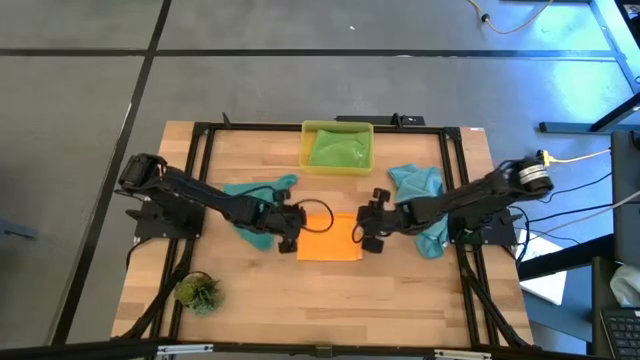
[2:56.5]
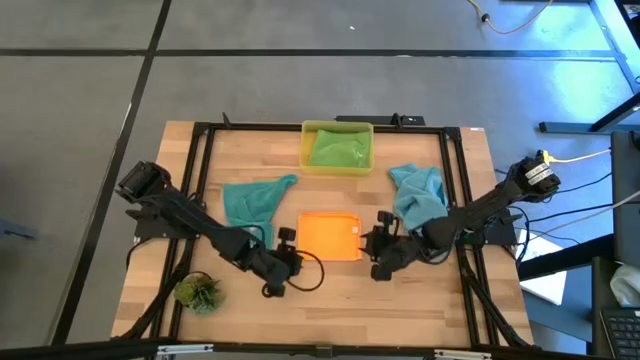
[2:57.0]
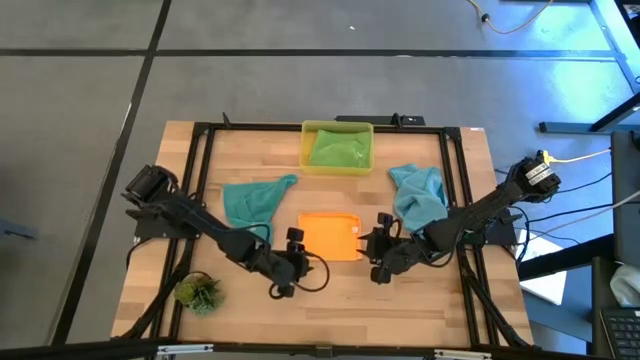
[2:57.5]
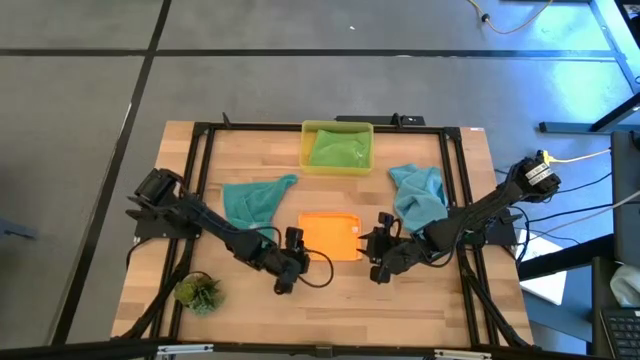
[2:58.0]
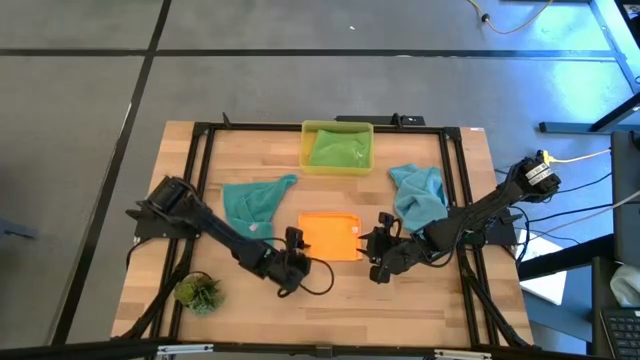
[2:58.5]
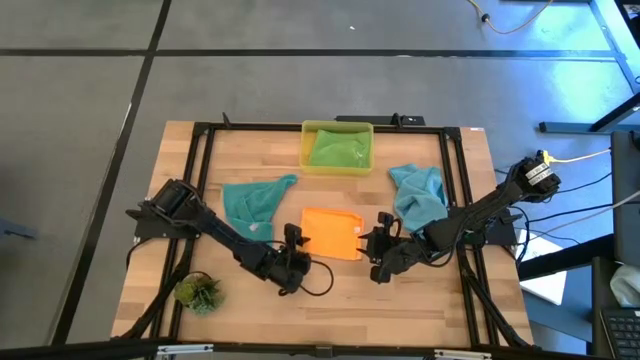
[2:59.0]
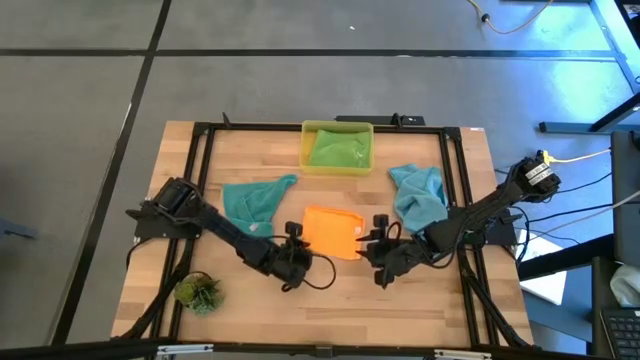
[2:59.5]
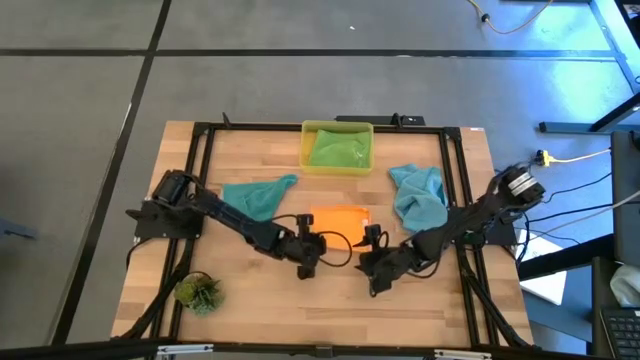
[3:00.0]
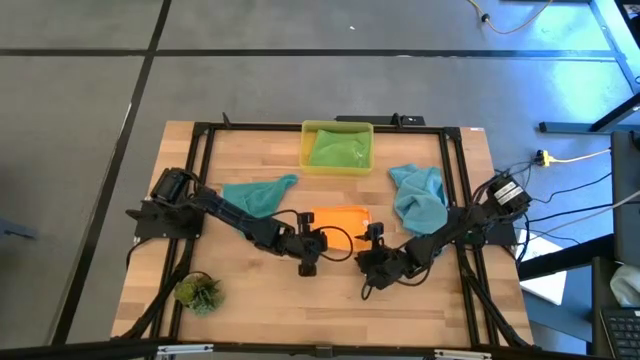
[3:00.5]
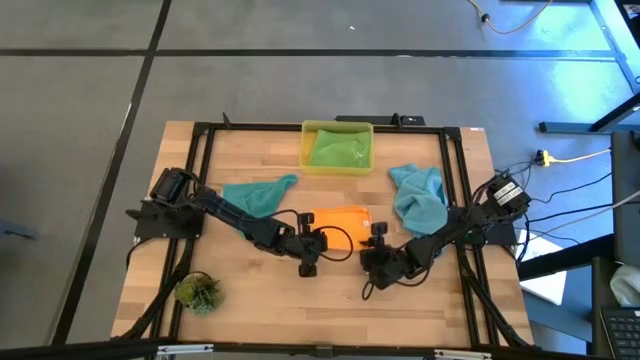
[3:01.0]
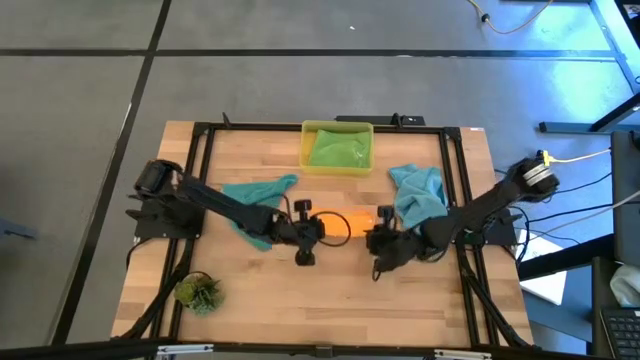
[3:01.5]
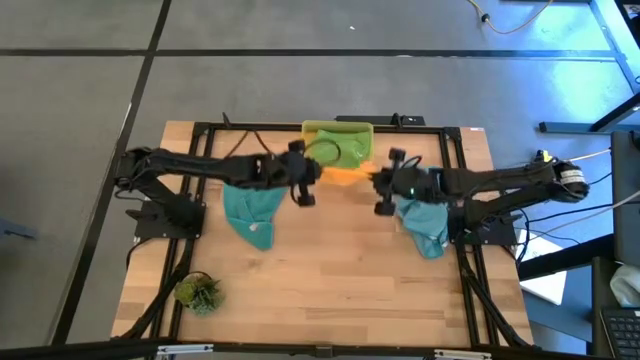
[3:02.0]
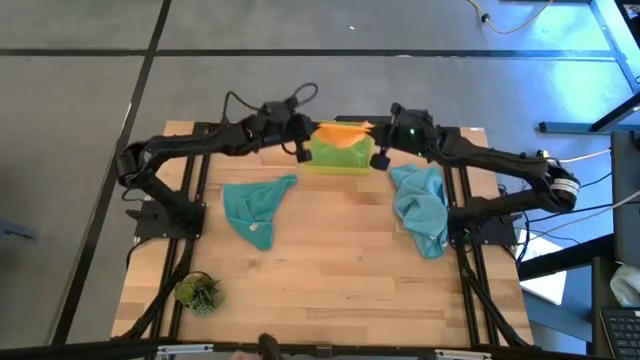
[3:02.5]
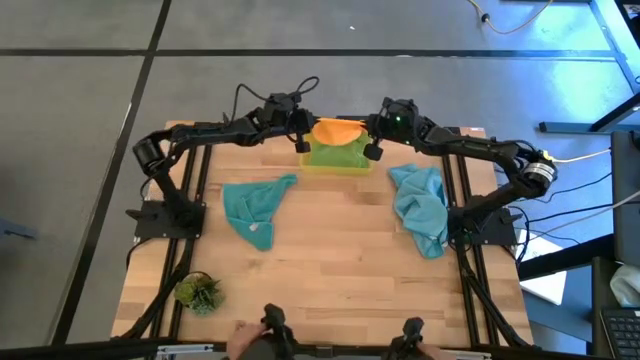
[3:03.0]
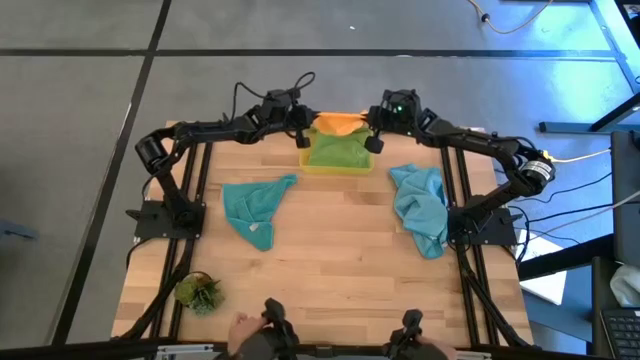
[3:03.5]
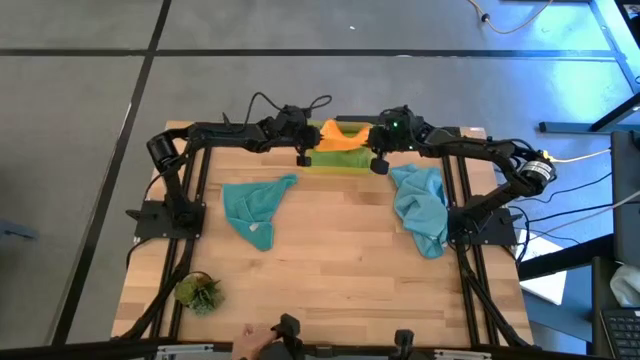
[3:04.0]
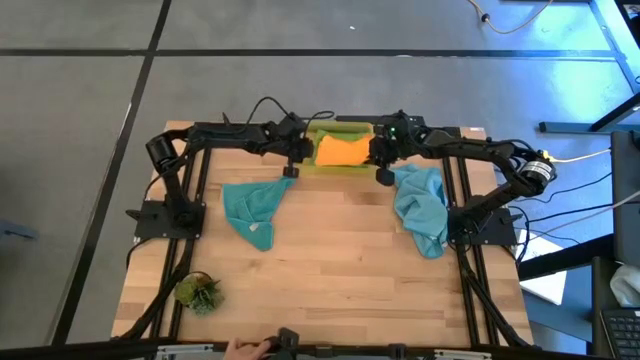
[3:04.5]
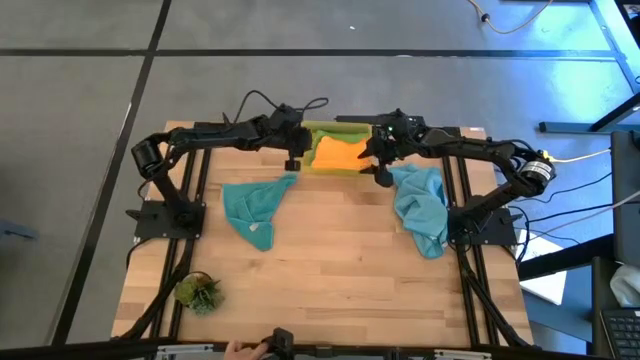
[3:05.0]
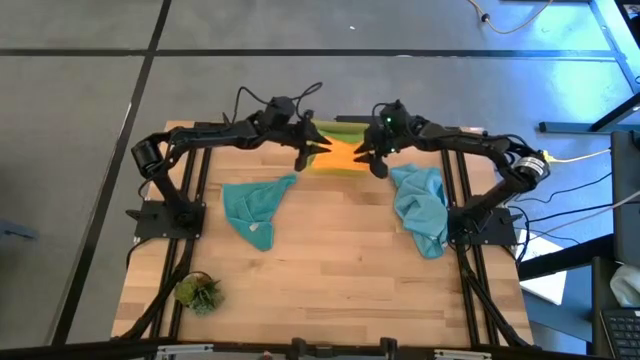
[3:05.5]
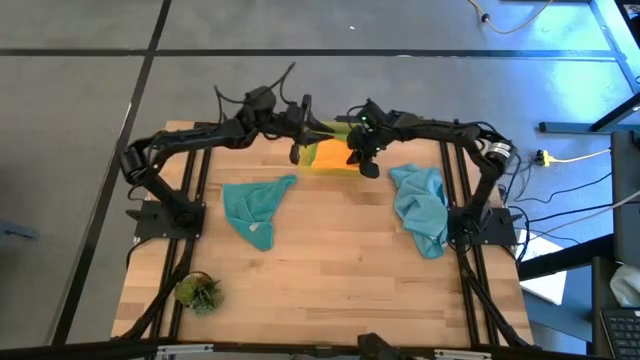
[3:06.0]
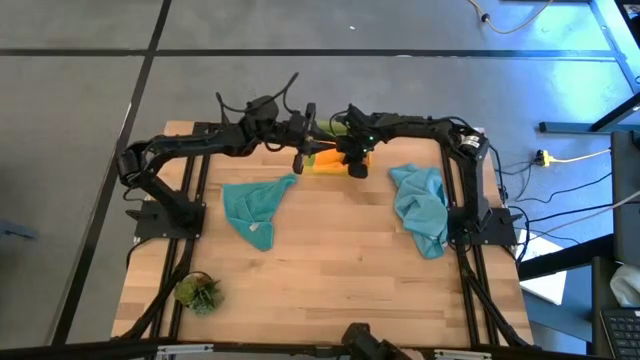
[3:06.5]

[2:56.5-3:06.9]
Task: Fold microfiber towels
Put the orange microfiber cloth into the yellow bin

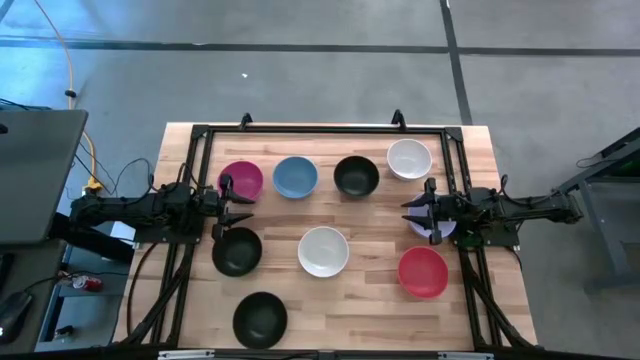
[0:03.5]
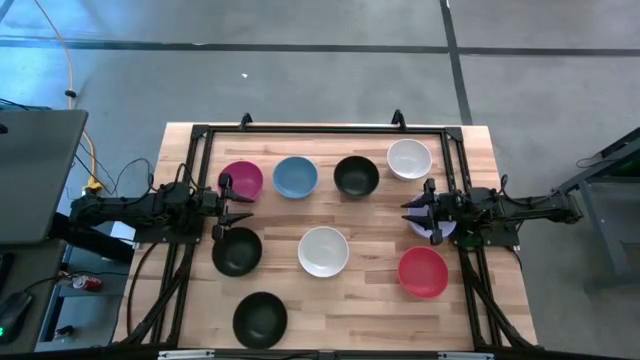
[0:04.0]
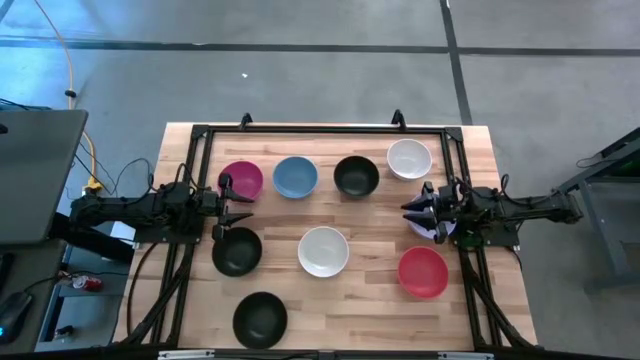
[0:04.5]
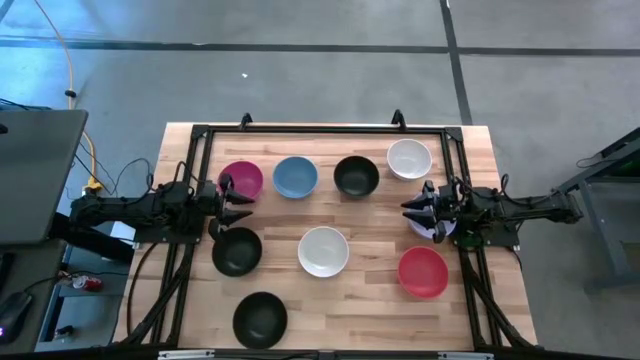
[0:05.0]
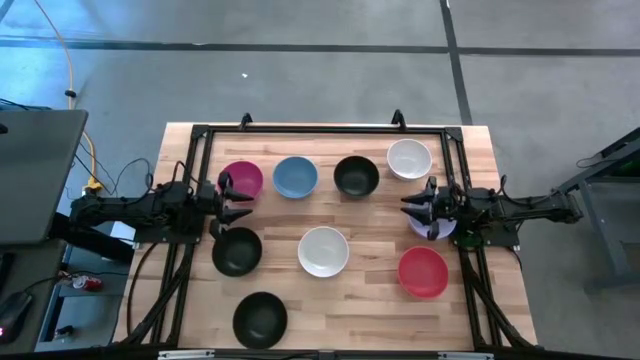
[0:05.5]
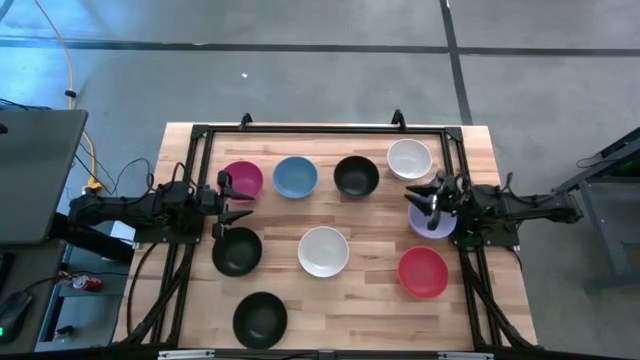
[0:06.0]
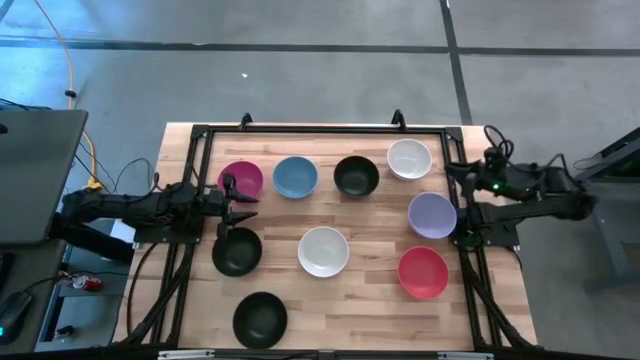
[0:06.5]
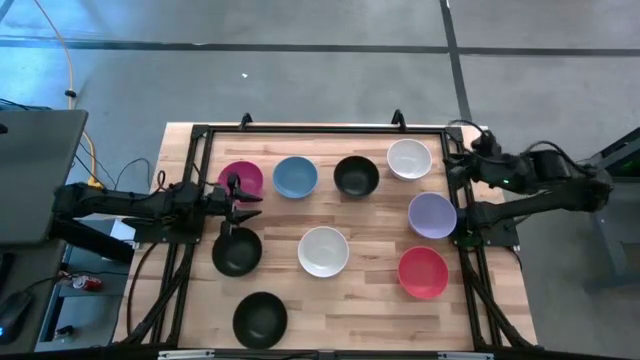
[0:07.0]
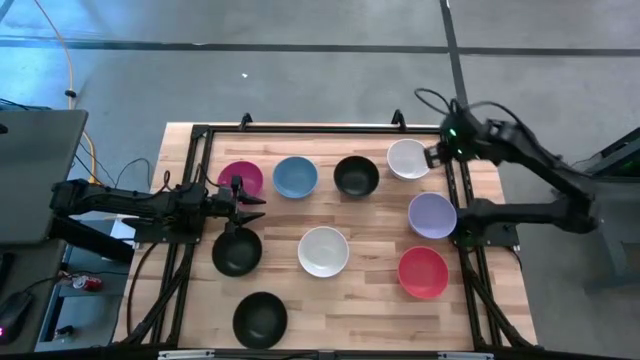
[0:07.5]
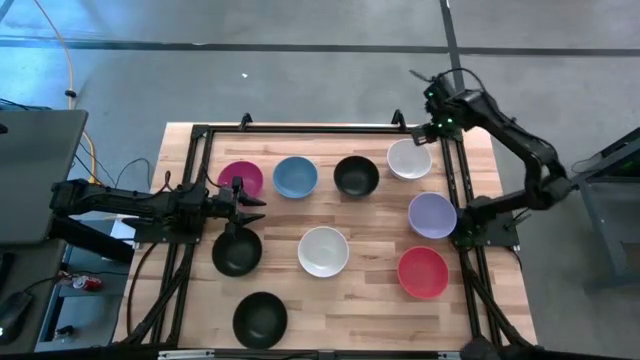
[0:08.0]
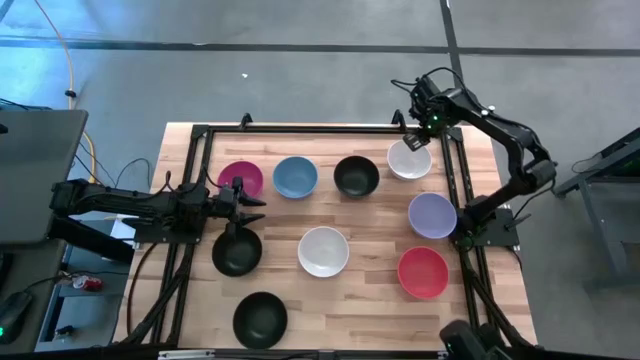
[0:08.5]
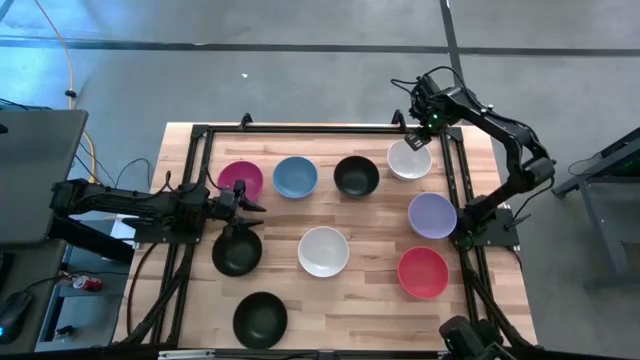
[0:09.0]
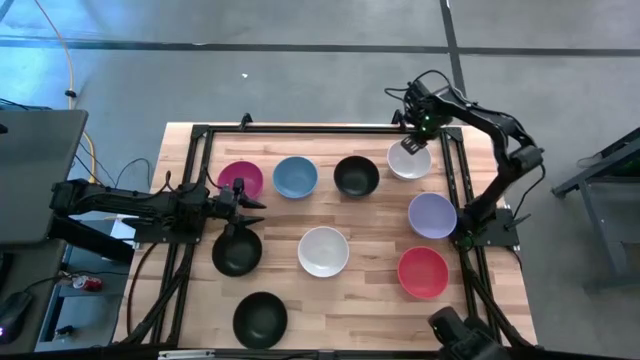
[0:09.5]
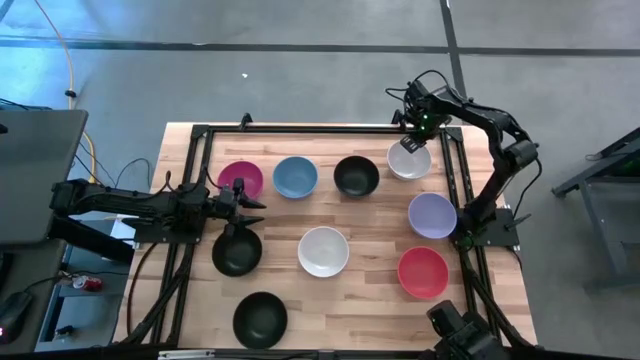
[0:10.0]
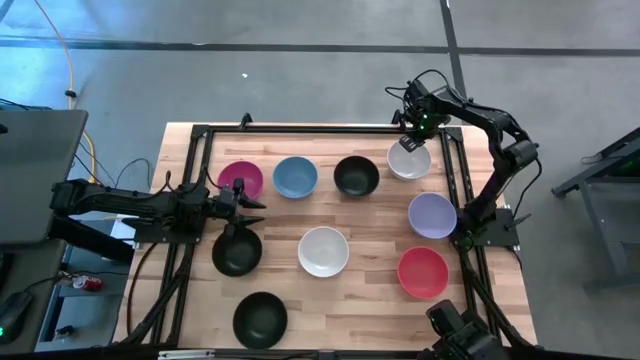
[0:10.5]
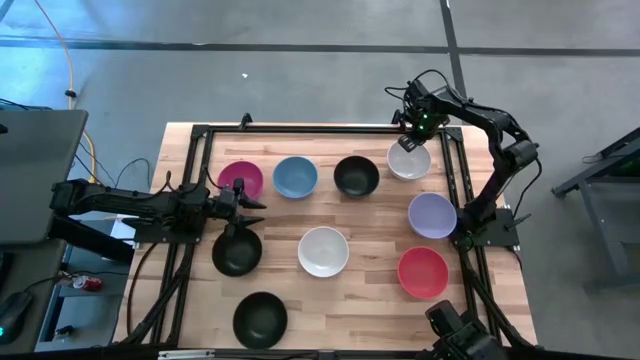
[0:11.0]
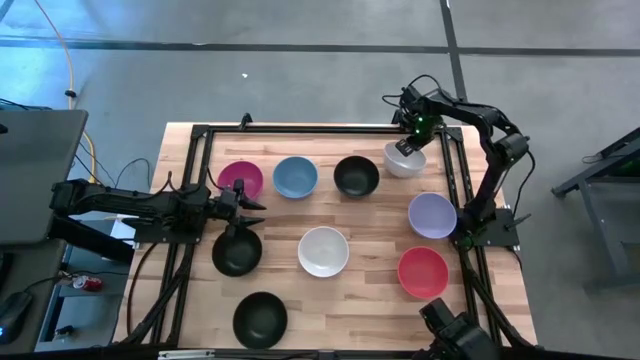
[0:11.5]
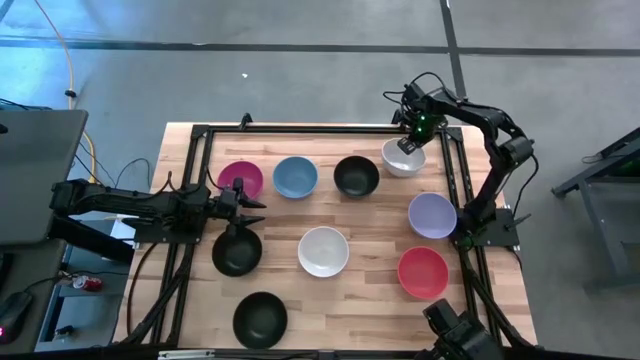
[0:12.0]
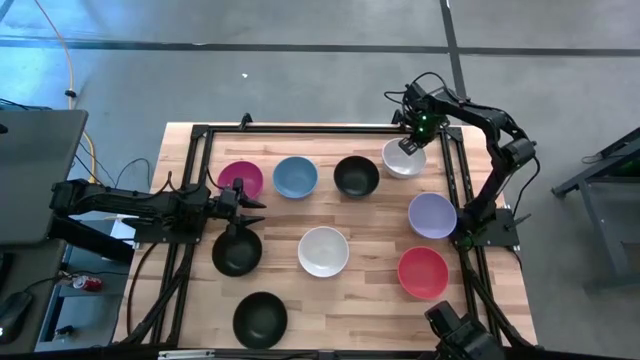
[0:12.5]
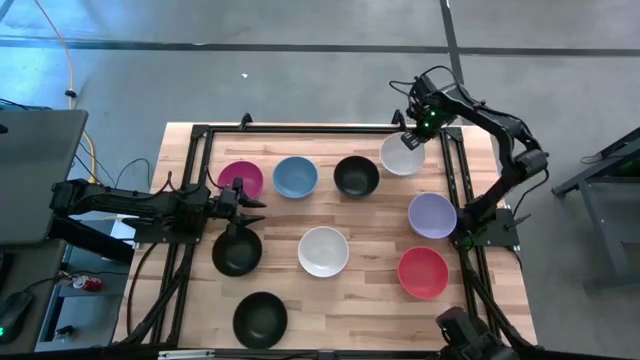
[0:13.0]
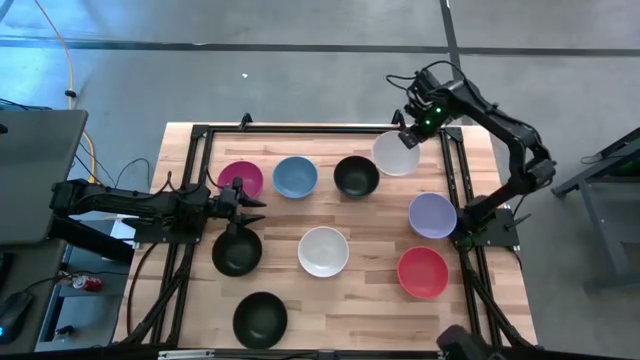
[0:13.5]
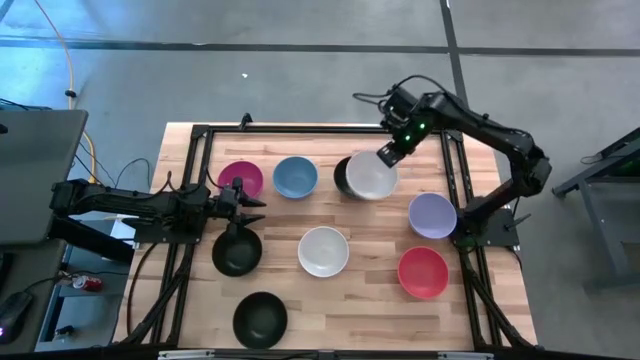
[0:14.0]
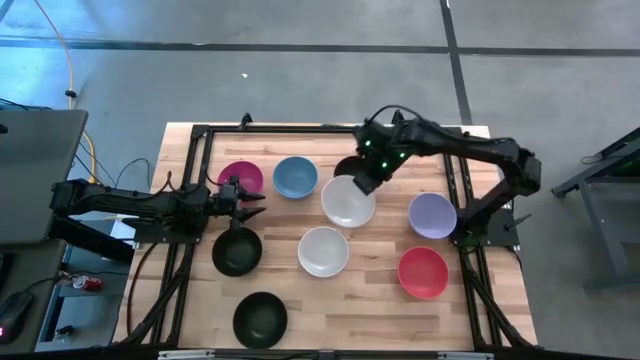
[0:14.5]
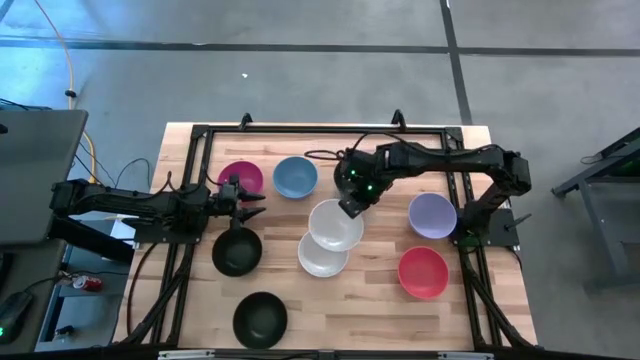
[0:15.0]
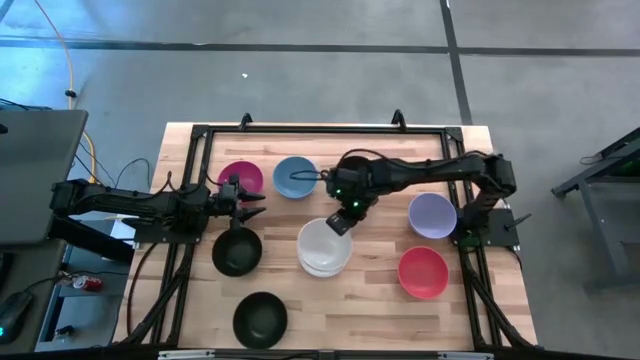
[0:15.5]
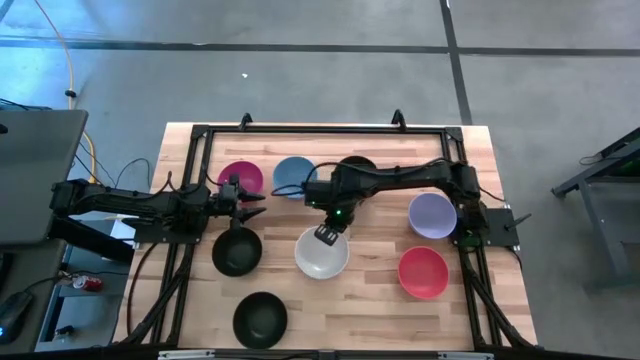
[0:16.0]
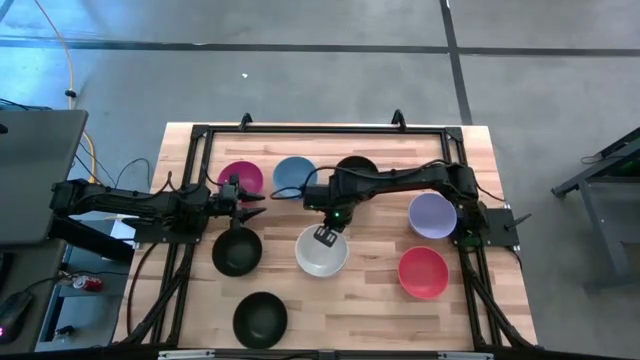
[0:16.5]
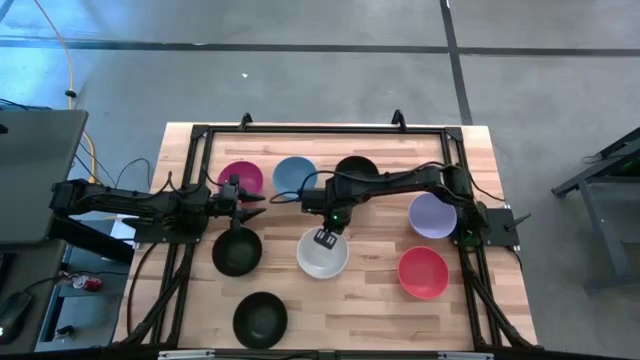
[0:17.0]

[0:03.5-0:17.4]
Task: Nest bowls inside each other
Stack the top white bowl on top of the white bowl
